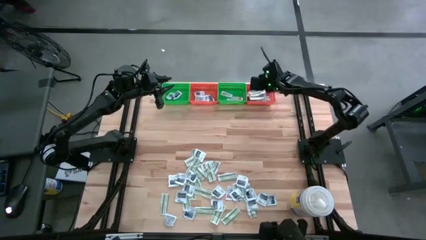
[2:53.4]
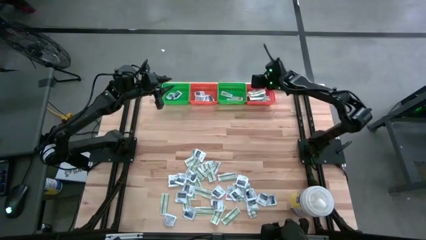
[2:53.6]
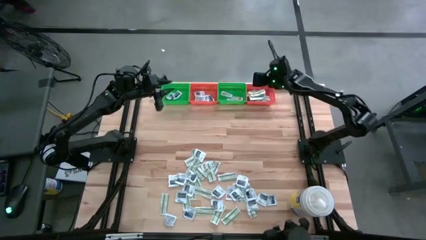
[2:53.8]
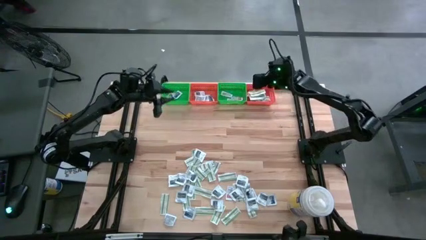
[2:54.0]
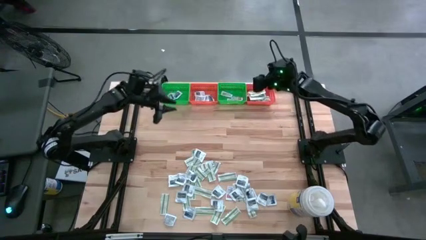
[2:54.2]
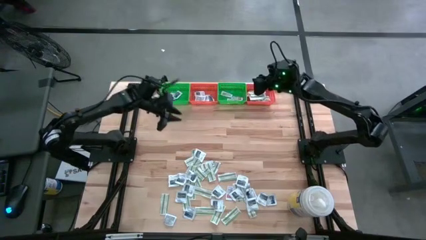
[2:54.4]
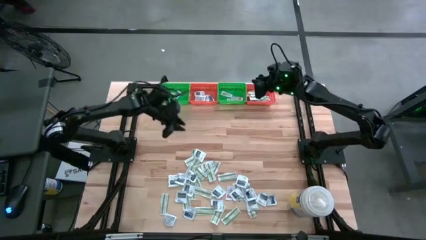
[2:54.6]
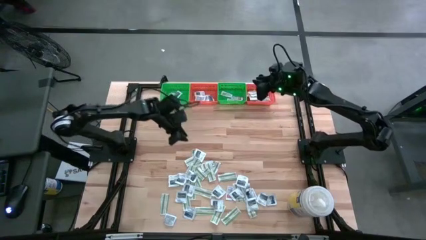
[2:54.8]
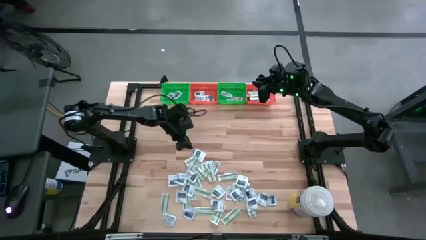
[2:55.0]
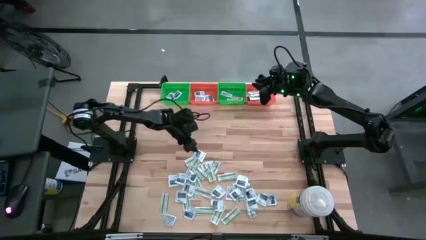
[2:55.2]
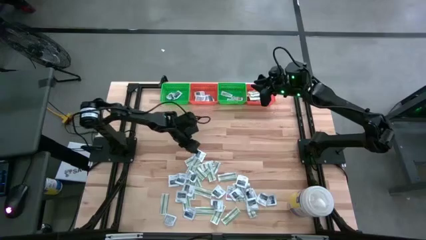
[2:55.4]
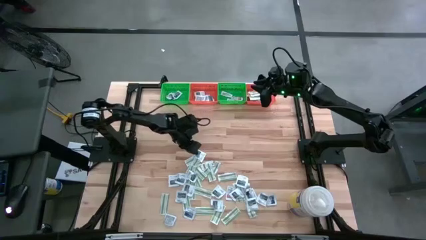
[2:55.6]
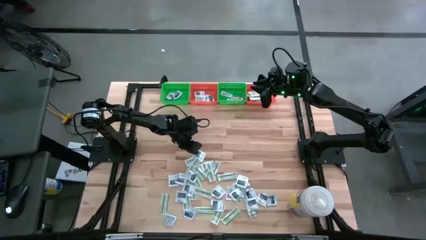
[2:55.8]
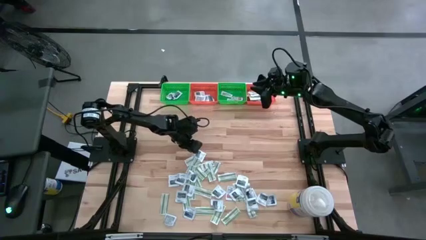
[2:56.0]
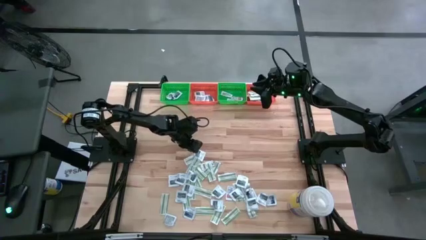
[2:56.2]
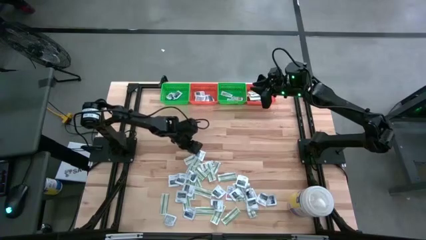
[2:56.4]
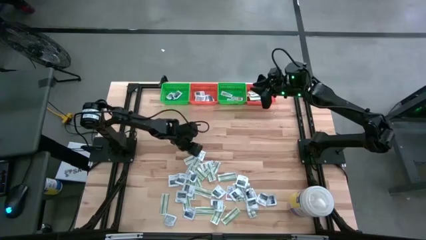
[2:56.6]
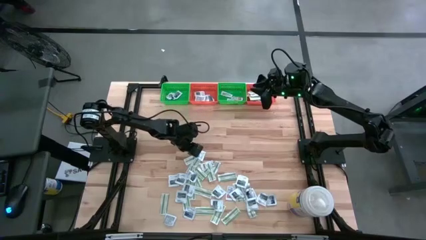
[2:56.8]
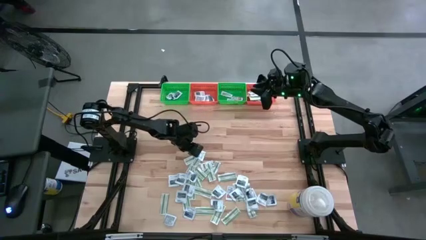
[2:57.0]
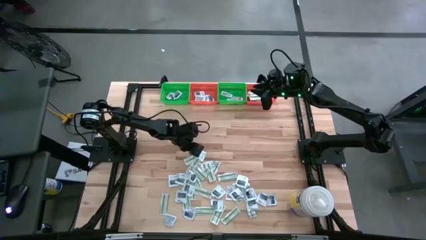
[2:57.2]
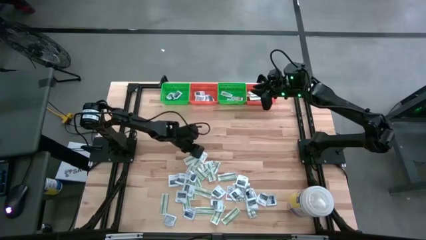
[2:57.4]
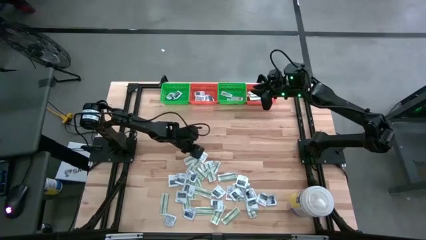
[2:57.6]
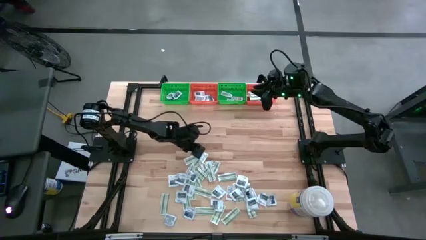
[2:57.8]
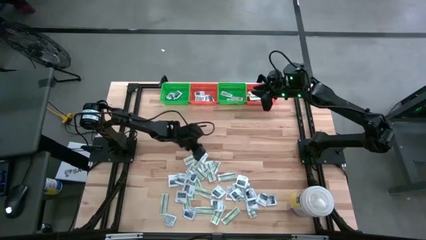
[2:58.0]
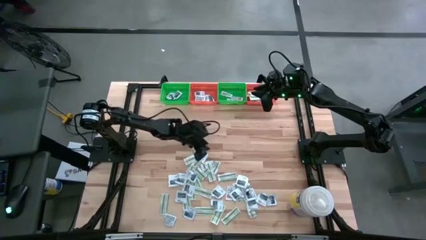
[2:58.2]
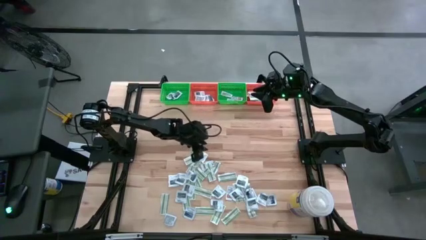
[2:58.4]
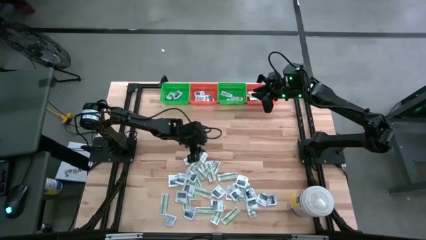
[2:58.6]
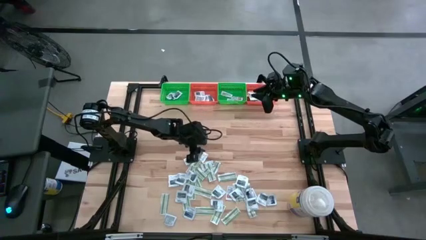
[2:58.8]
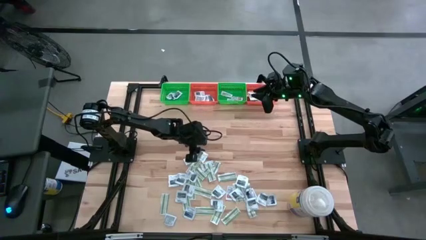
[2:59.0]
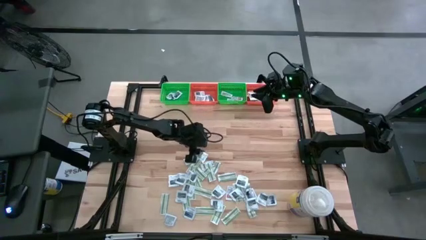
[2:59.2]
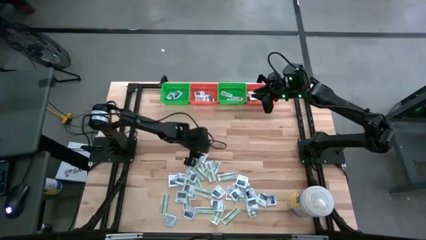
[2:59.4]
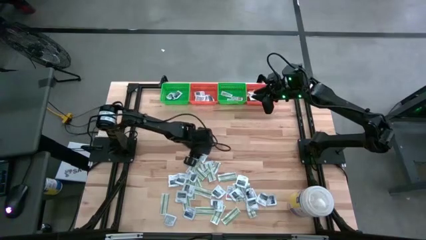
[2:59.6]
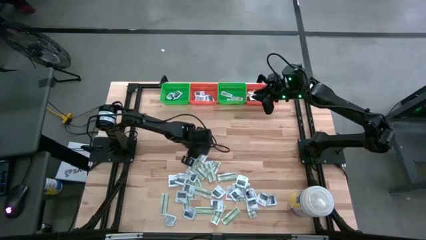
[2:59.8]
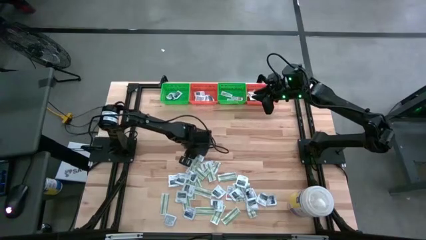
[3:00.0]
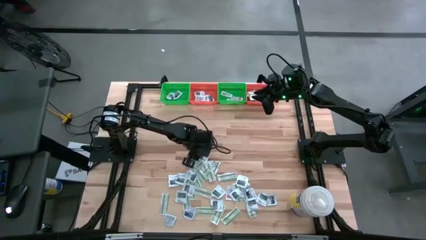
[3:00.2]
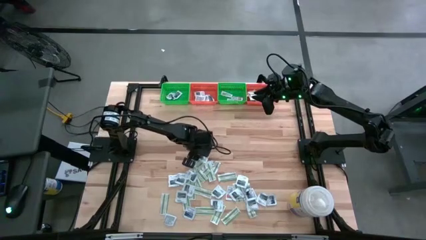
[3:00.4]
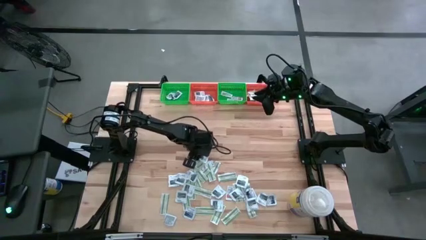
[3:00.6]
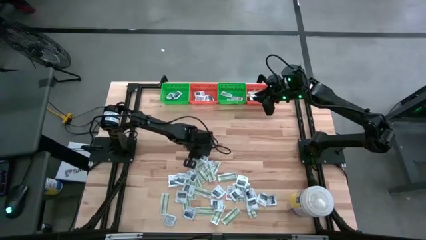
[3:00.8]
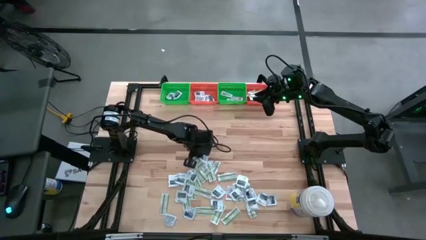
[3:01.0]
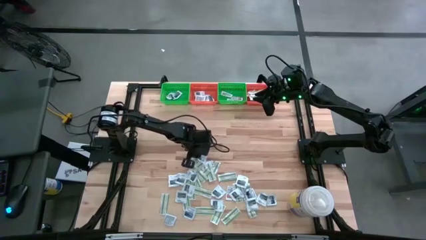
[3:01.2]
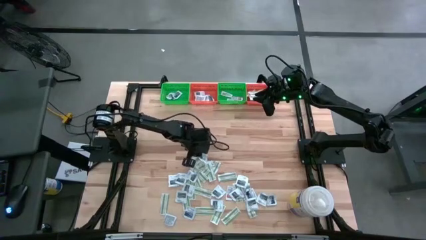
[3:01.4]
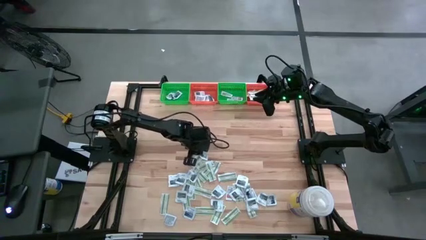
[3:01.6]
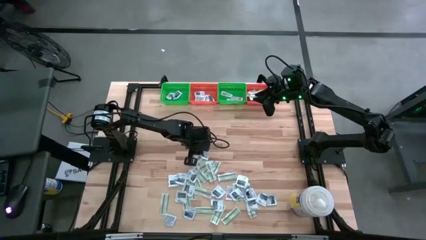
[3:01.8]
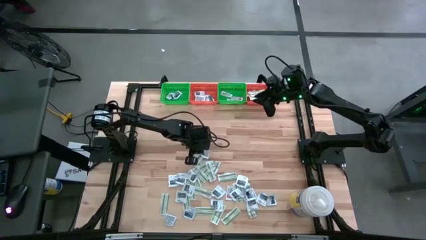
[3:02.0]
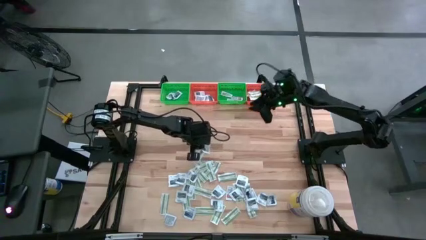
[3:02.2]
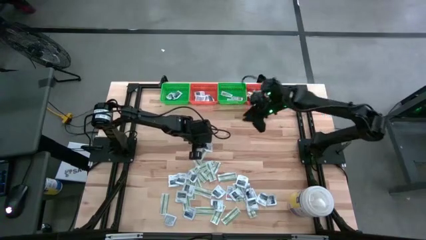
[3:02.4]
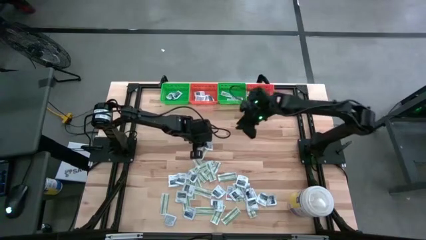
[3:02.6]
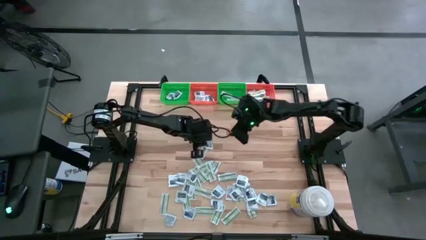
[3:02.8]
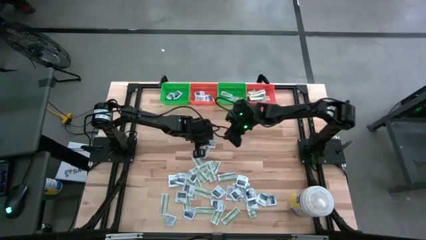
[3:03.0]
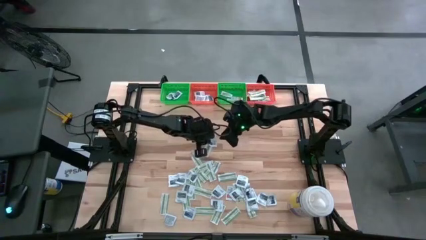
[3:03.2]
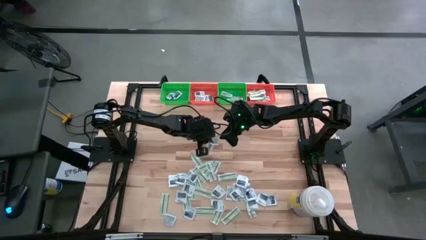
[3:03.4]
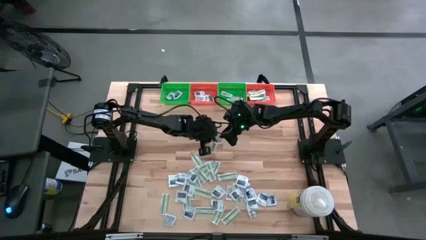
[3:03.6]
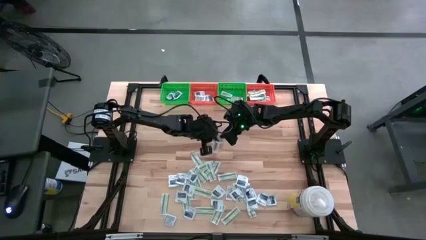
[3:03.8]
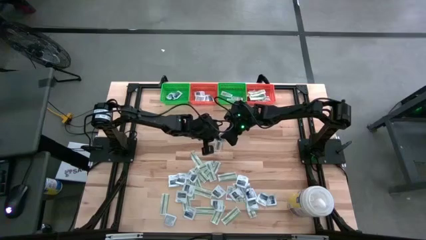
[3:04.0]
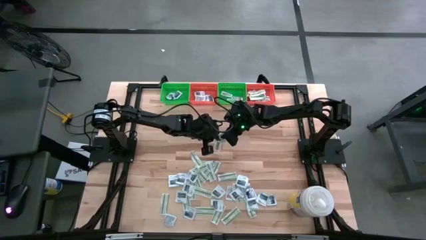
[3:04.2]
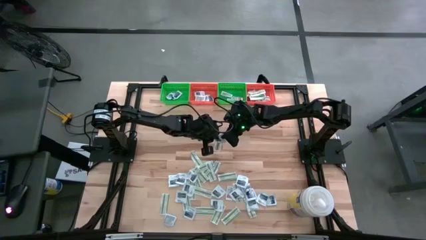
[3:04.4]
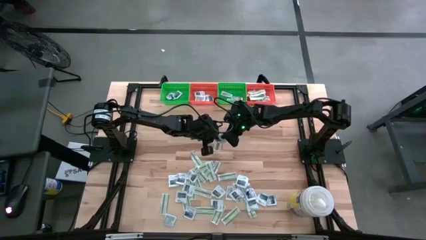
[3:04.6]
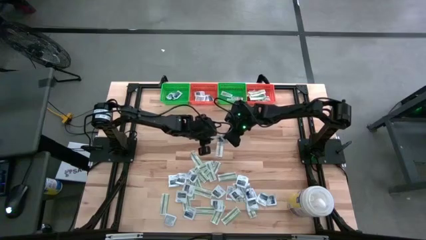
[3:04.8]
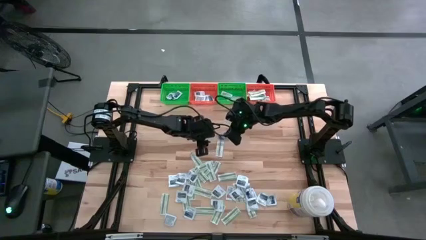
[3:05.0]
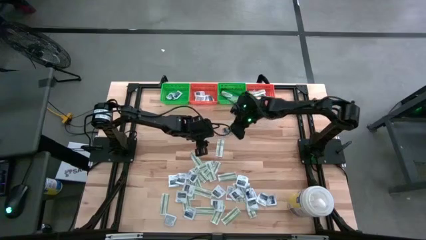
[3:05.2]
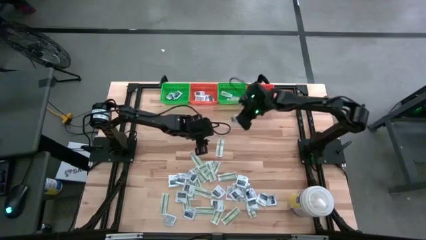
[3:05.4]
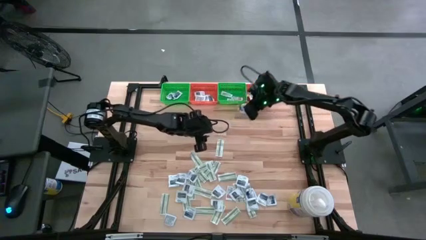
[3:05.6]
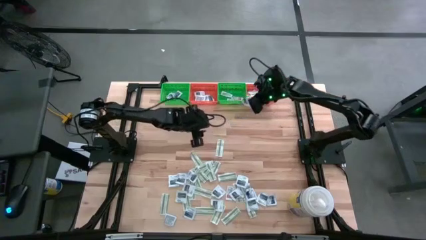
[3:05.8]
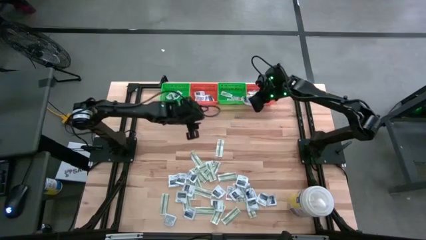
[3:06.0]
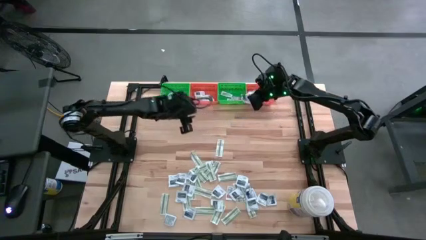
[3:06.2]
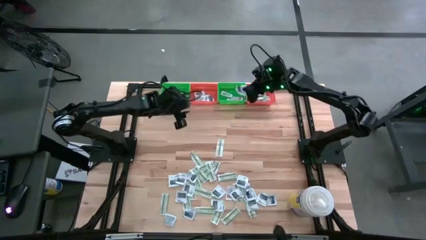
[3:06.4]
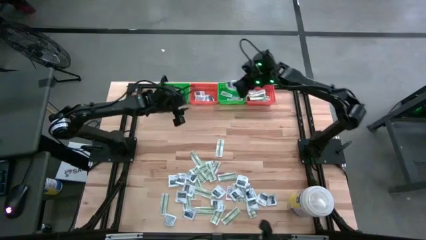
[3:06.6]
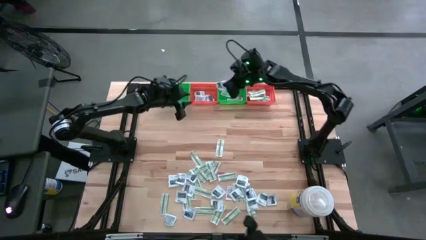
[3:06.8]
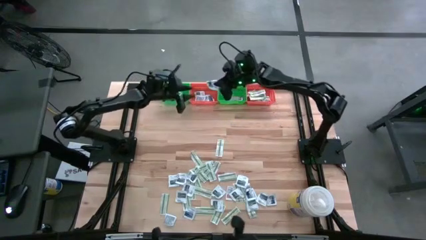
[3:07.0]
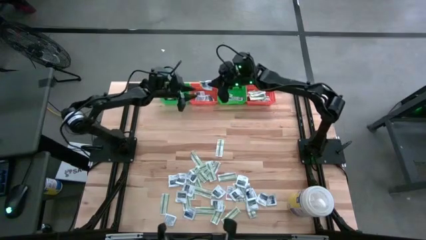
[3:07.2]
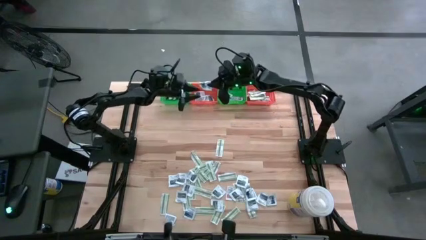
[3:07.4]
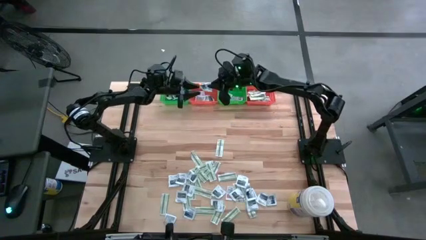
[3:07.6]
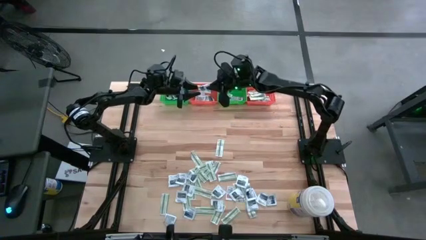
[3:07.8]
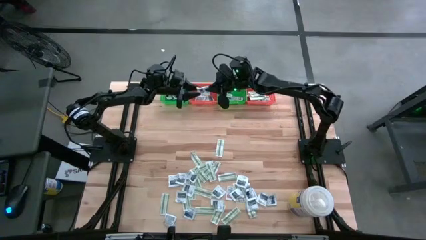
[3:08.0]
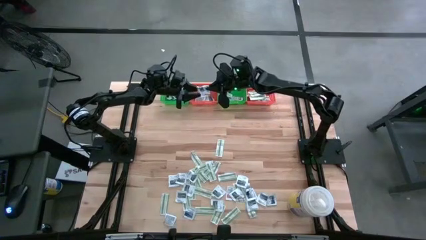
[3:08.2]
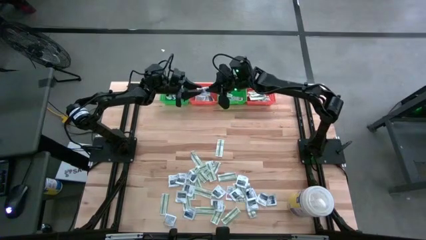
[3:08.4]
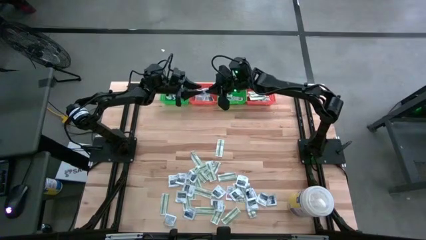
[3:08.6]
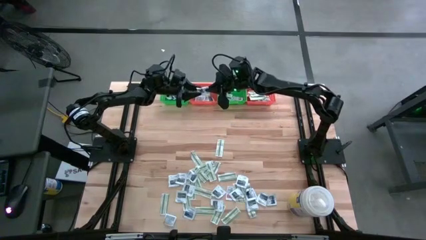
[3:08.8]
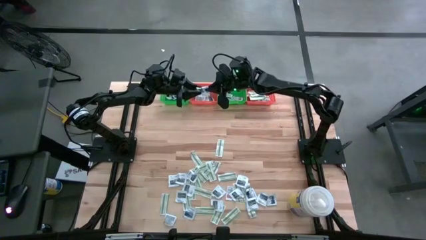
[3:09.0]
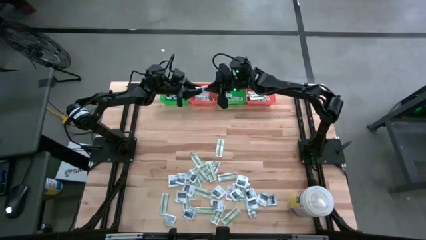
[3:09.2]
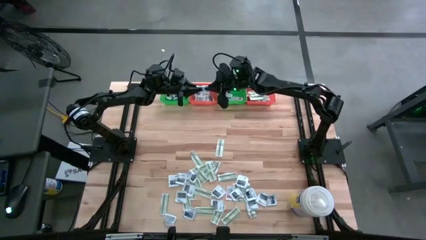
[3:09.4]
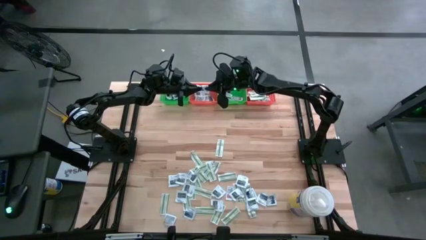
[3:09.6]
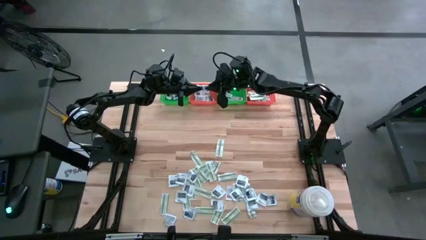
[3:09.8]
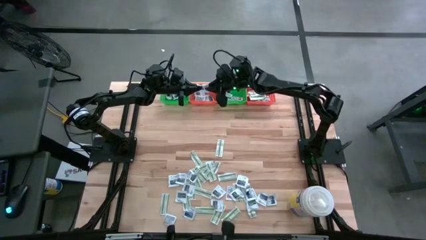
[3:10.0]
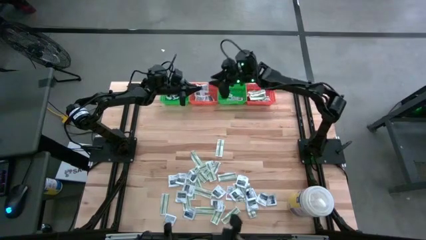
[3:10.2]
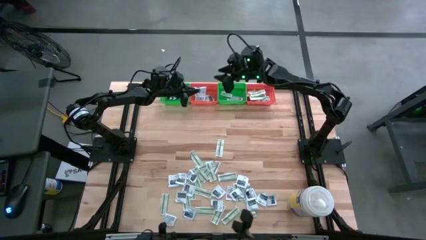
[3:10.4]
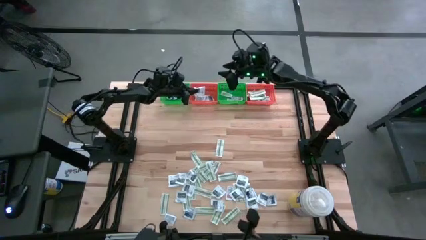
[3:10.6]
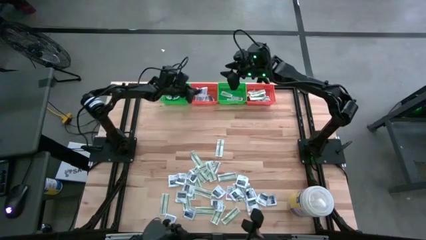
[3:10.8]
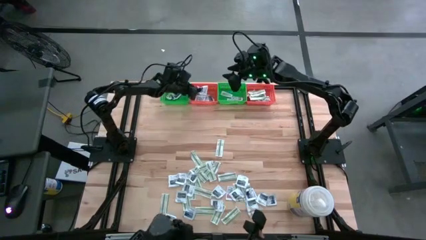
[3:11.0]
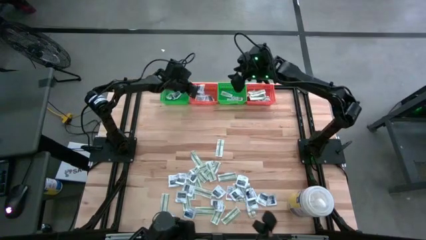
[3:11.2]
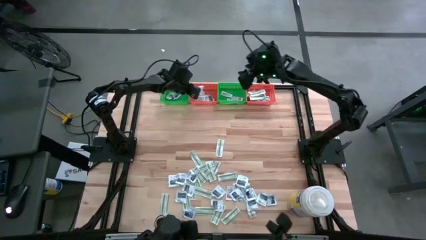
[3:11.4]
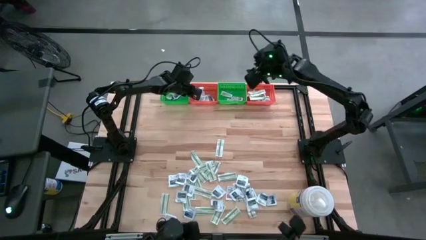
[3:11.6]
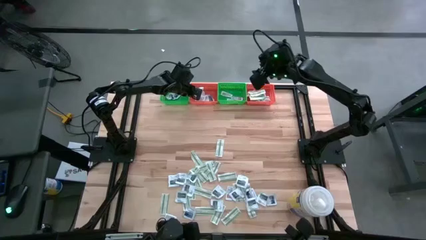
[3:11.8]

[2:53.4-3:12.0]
Task: Pick & Place First Aid Supplies
Put the gray towelette pack in the left orange bin
